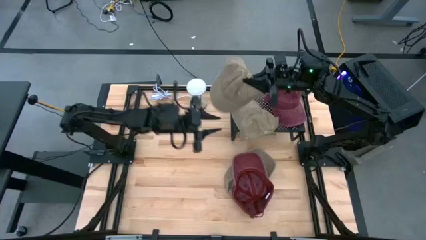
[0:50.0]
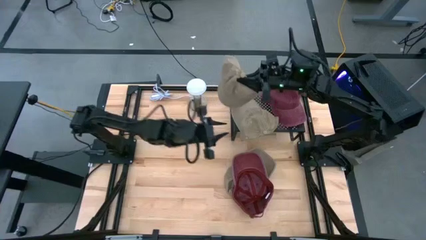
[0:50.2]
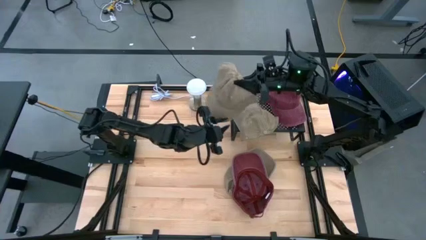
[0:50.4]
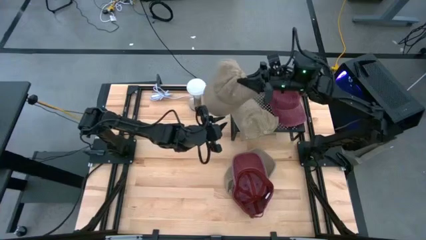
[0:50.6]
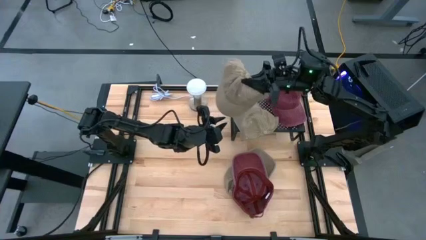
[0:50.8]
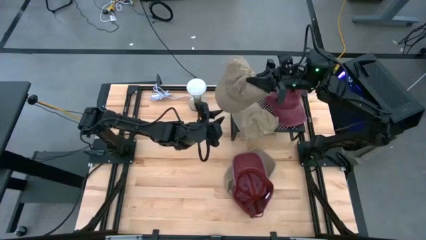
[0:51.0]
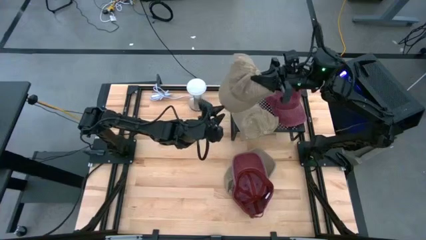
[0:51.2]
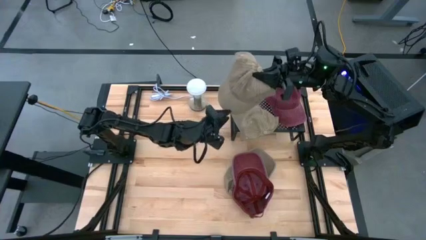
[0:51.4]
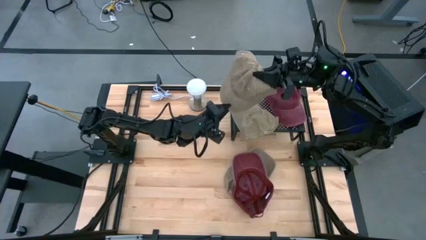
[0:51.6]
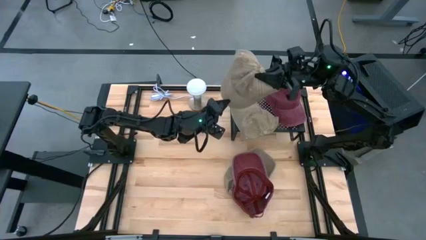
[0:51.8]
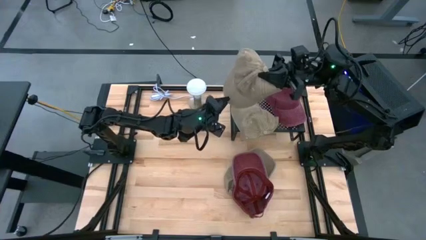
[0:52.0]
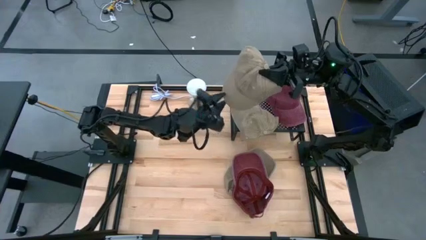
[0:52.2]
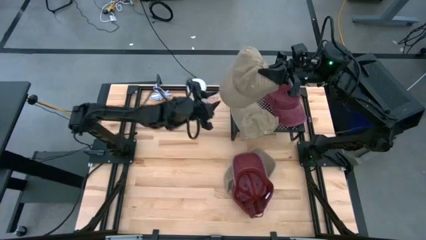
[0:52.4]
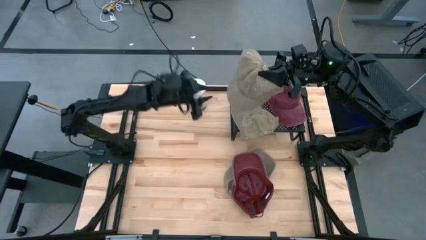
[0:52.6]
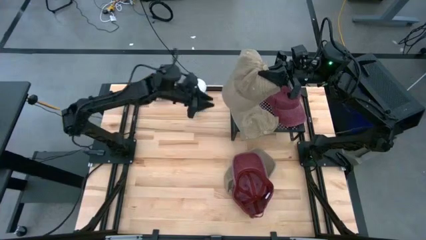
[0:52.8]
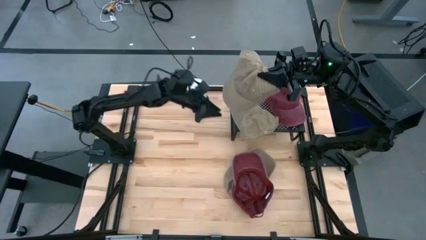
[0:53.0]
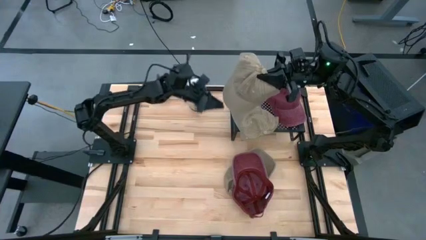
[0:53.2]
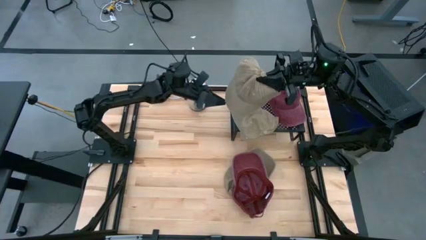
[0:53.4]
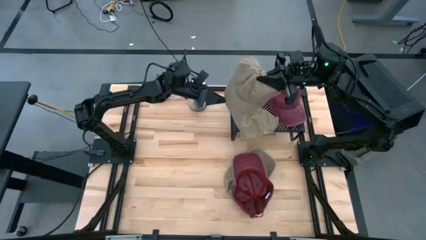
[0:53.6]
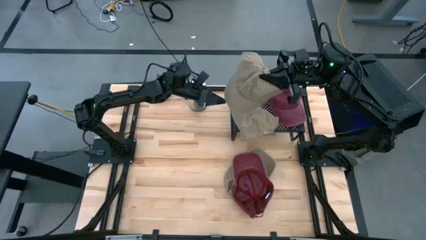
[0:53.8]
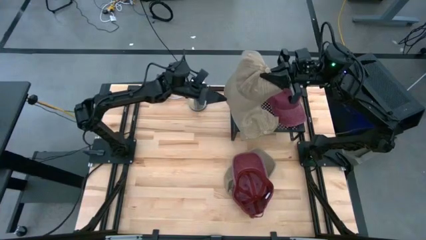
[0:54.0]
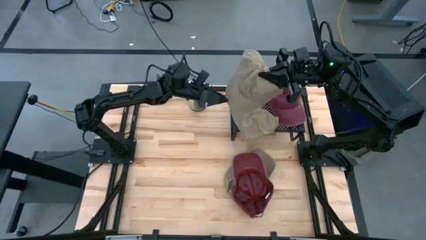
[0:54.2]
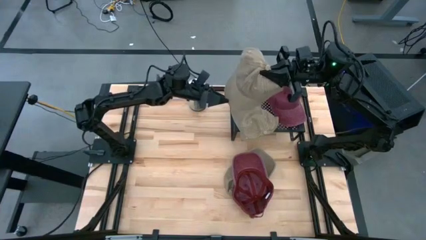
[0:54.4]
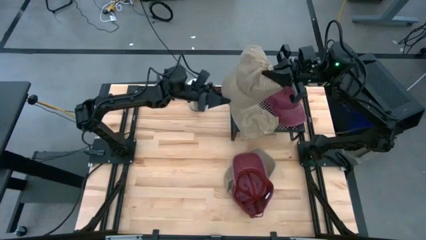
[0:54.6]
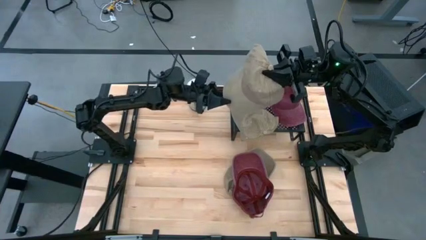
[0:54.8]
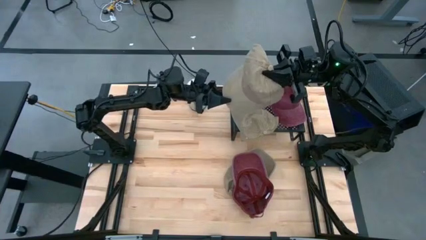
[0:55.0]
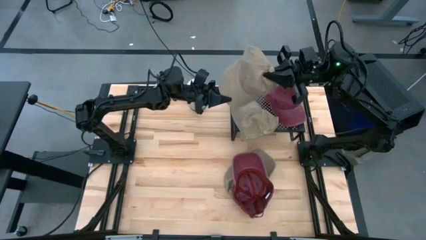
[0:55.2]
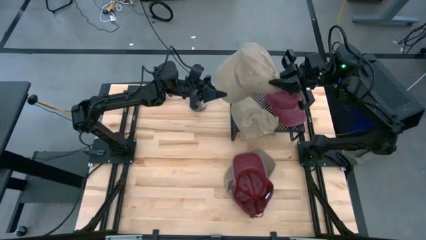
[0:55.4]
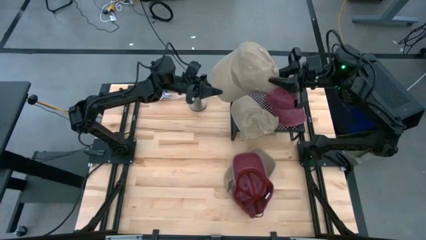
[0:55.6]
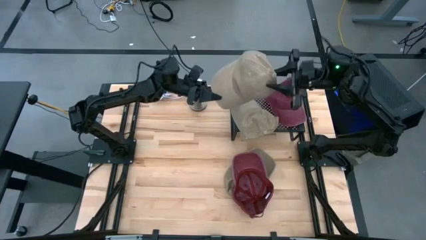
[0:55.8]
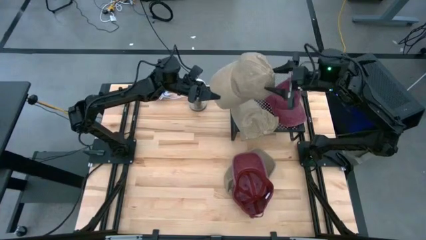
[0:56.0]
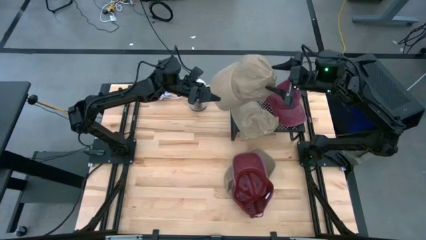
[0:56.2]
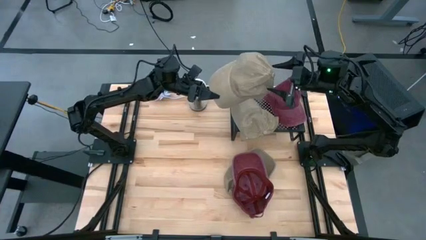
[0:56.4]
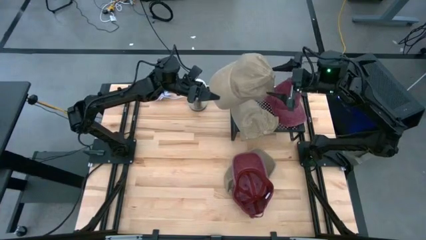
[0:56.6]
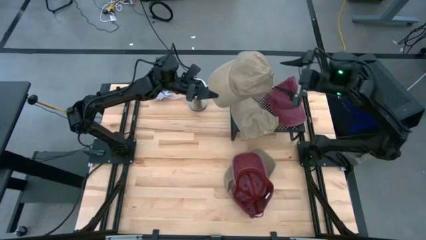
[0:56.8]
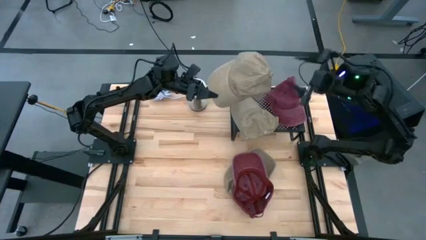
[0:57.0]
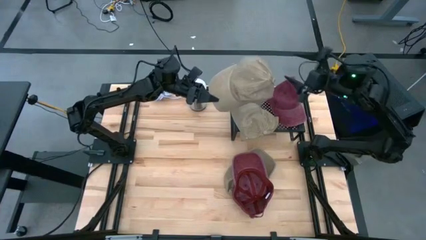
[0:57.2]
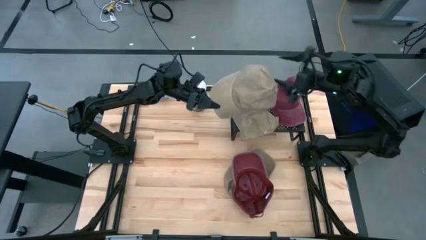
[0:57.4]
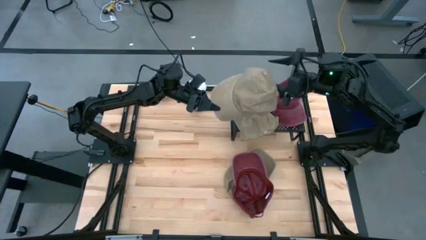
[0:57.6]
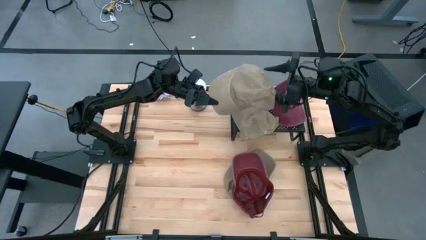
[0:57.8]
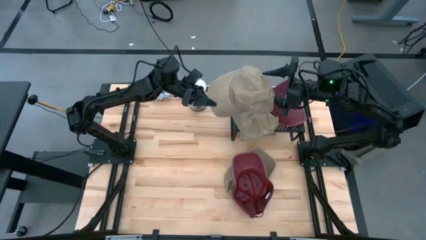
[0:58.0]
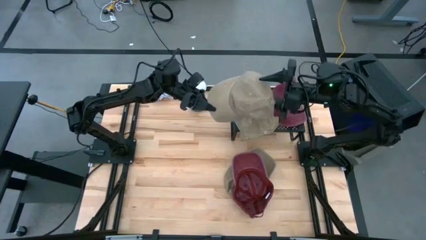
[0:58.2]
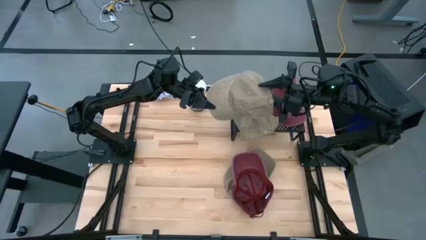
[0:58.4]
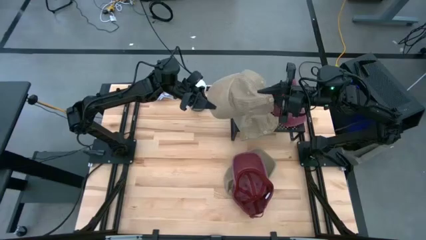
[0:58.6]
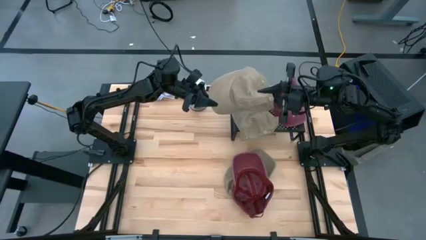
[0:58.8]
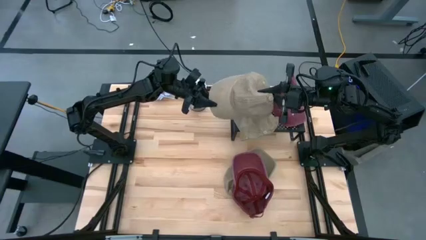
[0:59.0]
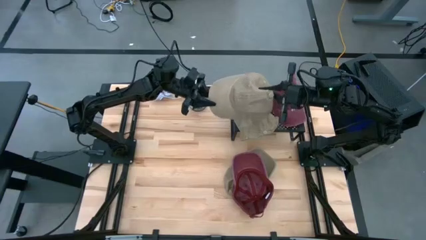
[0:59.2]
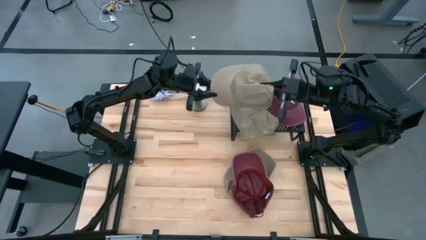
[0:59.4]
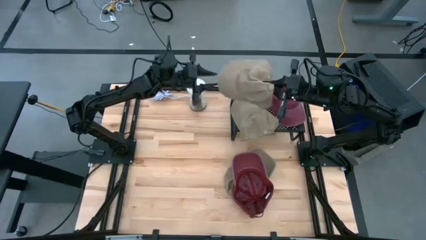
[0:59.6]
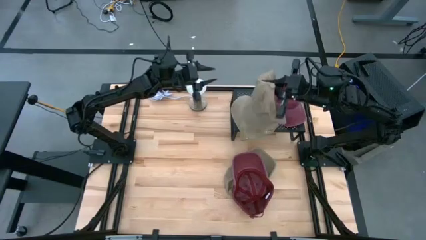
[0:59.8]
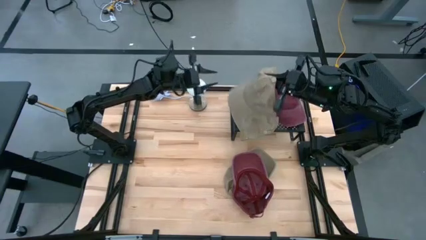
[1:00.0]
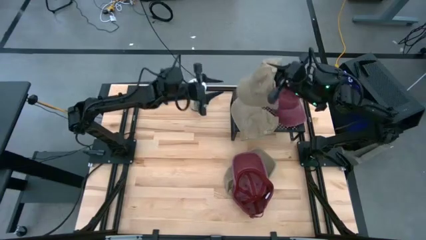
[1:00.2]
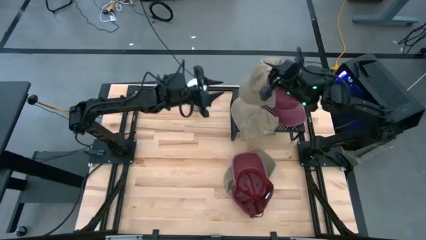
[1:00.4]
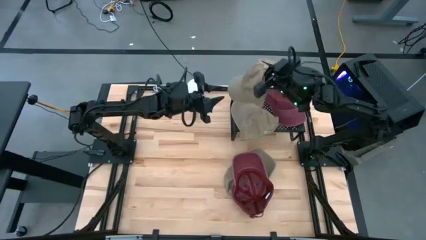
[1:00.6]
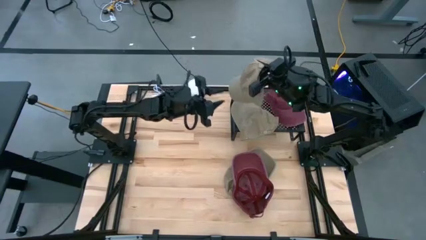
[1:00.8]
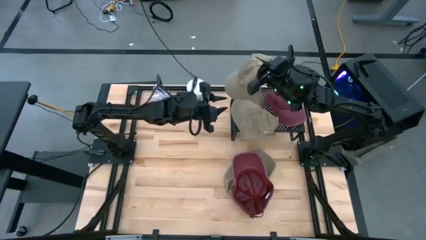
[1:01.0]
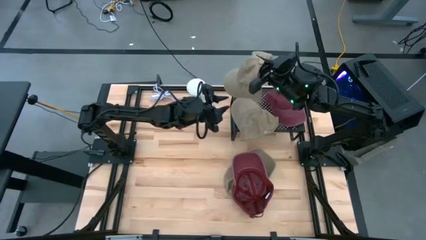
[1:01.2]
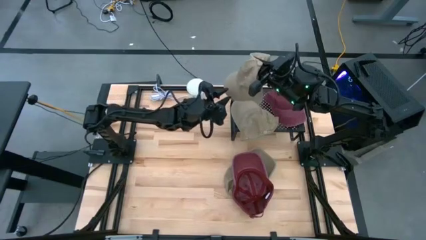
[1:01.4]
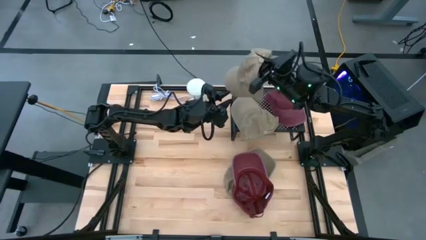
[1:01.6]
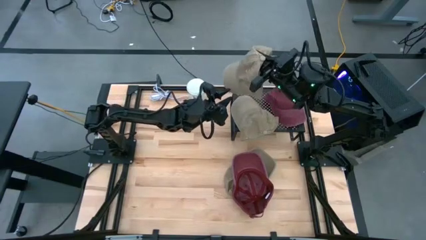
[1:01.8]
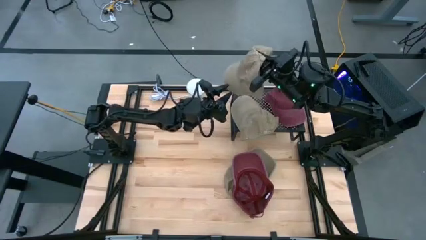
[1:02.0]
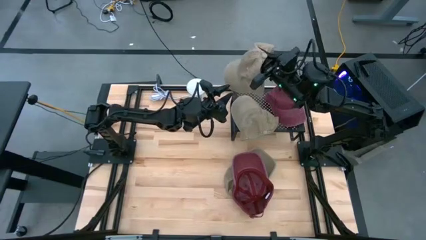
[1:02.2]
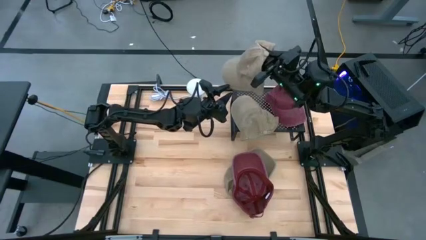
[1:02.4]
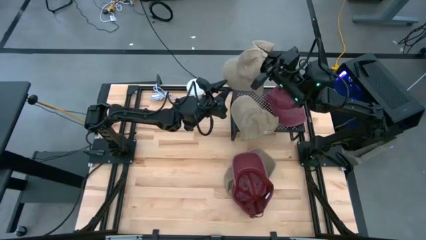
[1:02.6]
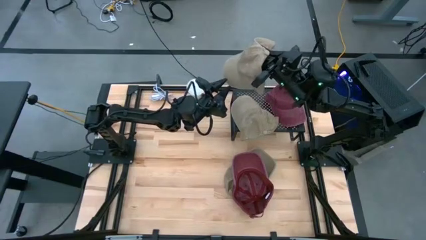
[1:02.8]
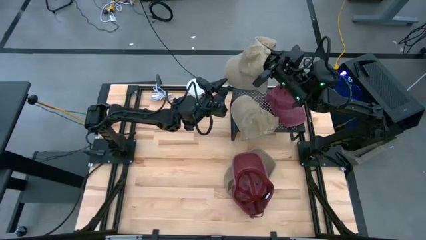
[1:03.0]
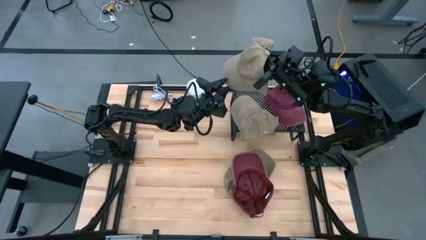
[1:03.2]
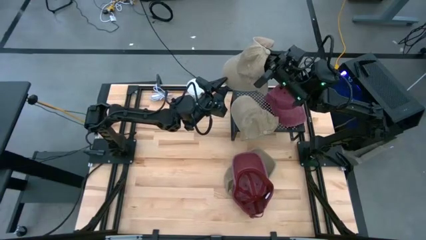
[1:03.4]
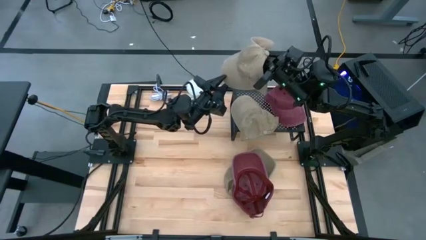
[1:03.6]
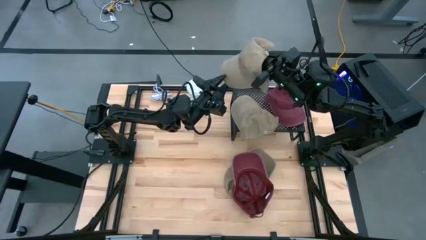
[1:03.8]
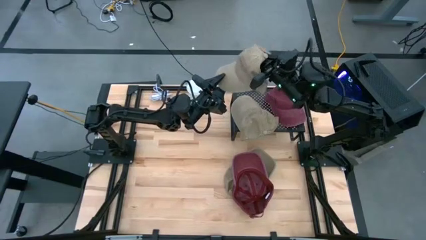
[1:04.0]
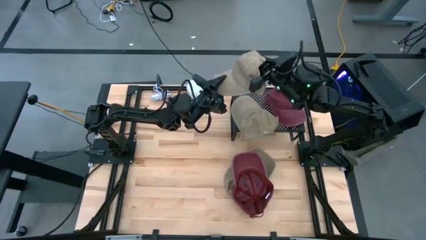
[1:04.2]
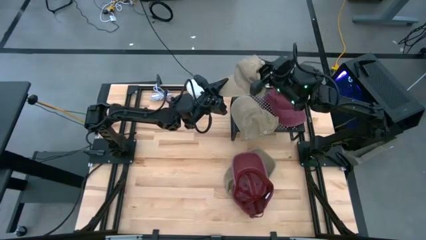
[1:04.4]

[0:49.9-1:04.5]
Task: Pick & Place hat
Stack the left brown hat on the brown hat on the black shelf
